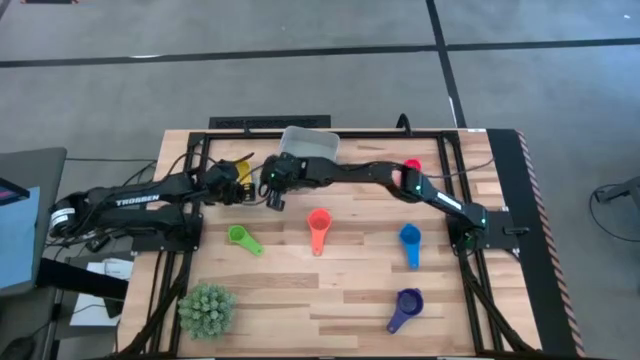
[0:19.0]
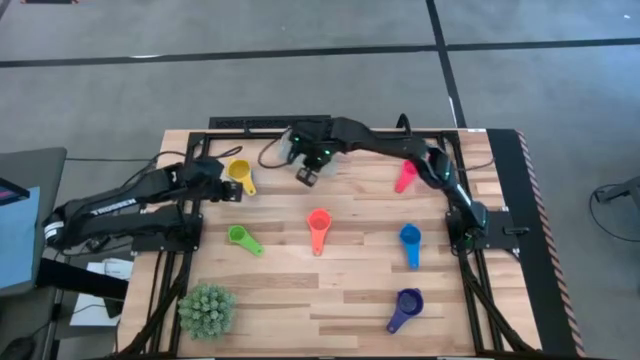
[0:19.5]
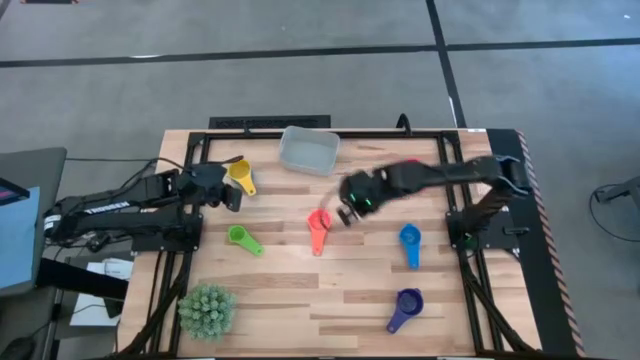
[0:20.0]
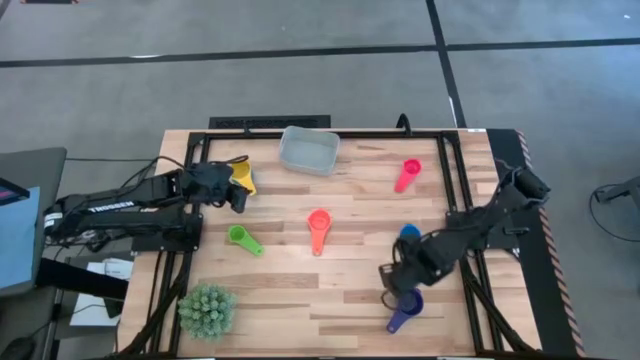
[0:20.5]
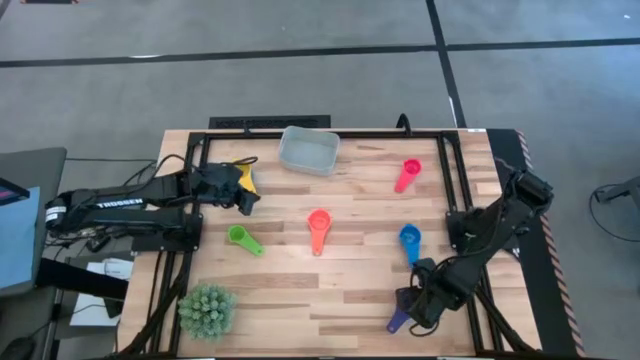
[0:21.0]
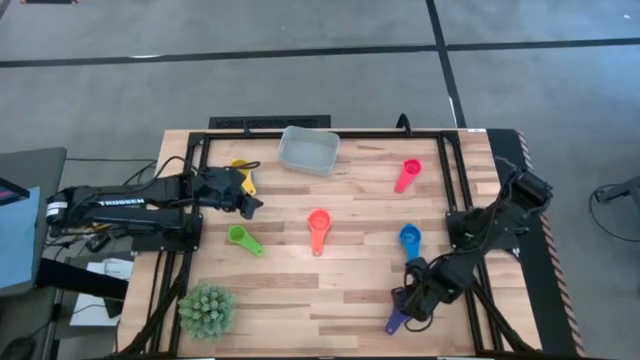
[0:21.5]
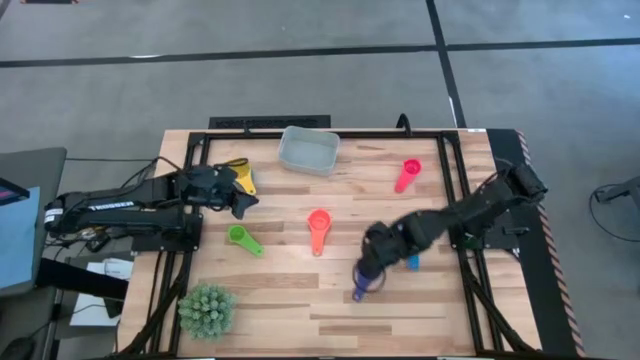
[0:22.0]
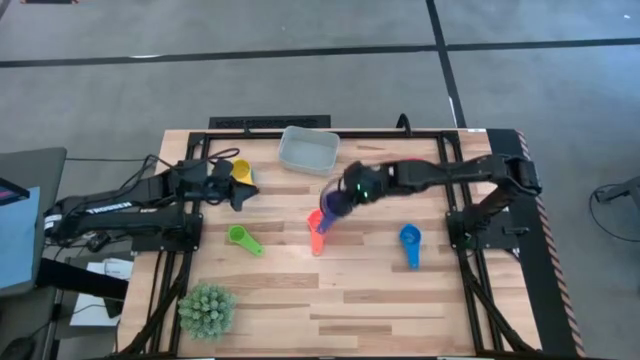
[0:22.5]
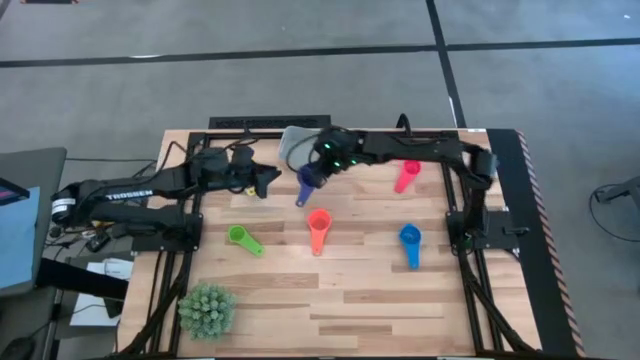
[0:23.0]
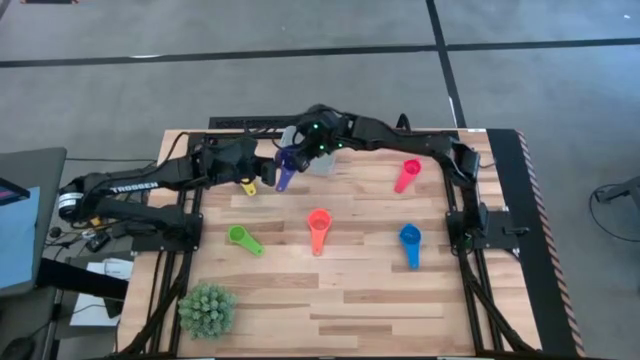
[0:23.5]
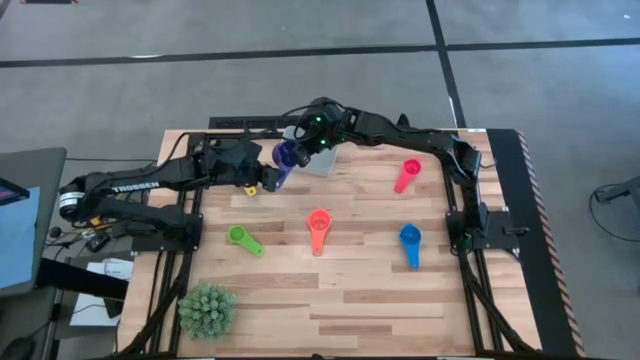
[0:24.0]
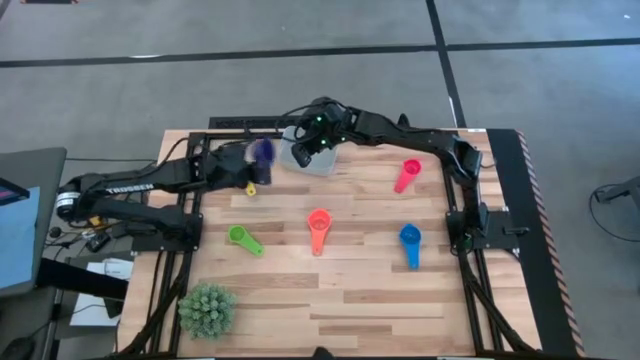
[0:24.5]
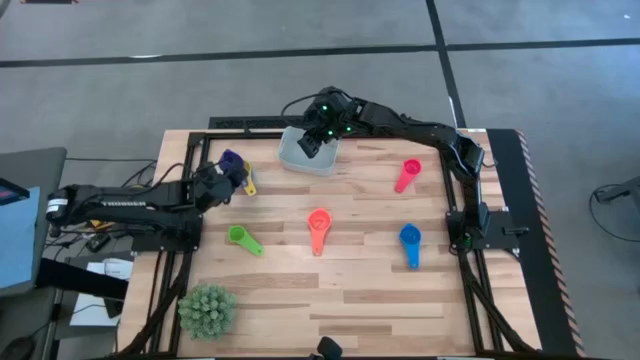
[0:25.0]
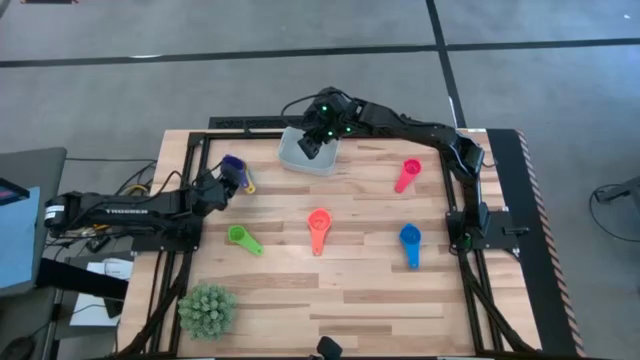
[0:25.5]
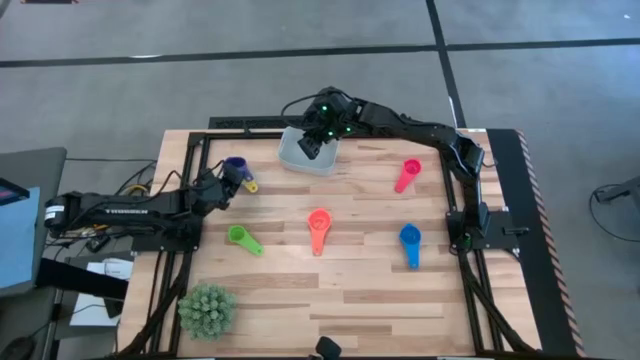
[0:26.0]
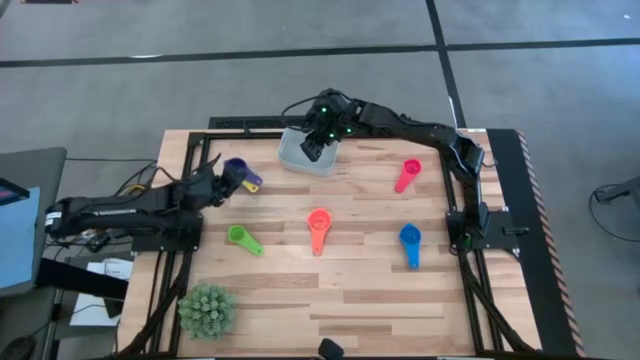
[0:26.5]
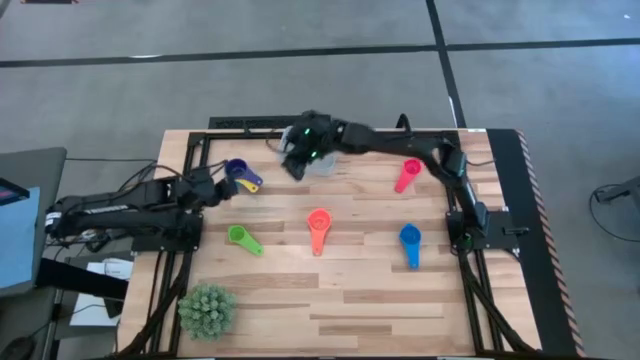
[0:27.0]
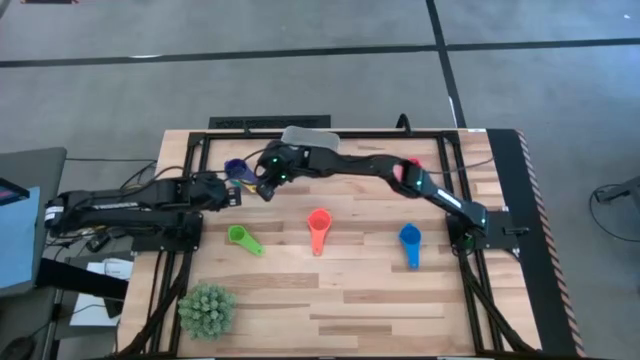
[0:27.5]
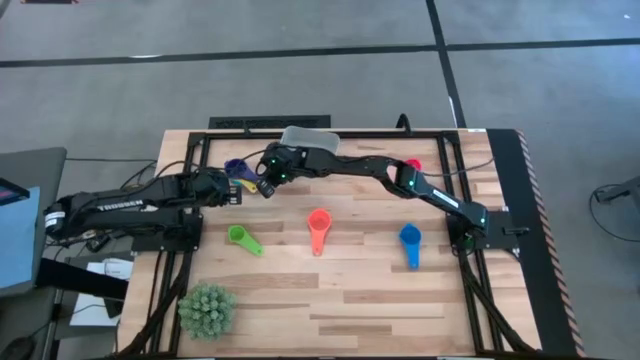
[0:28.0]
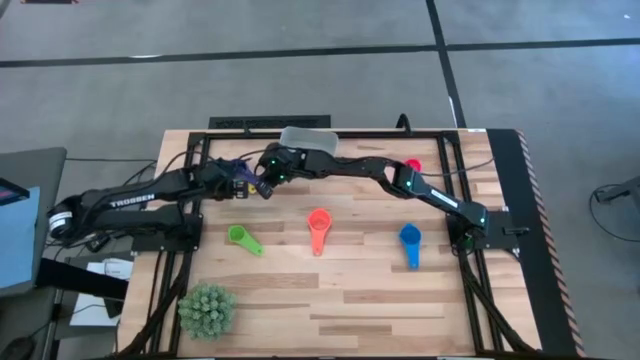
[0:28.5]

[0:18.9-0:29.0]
Task: Nest measuring cups in basket
Stack the navy blue measuring cup on the yellow measuring cup

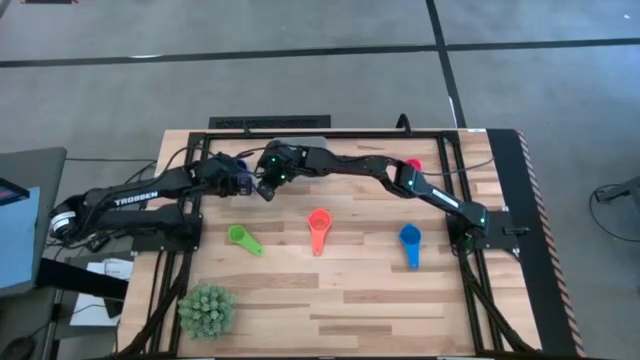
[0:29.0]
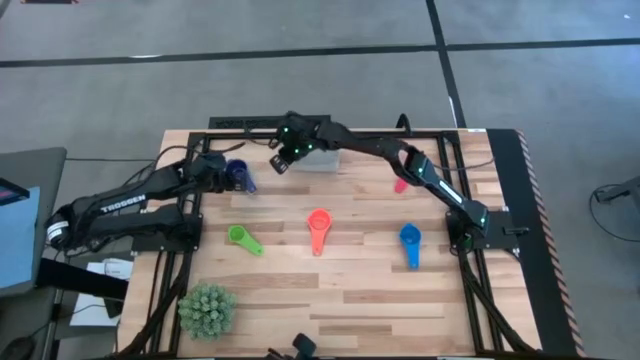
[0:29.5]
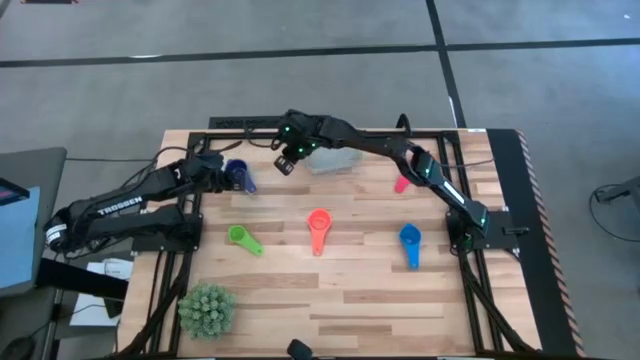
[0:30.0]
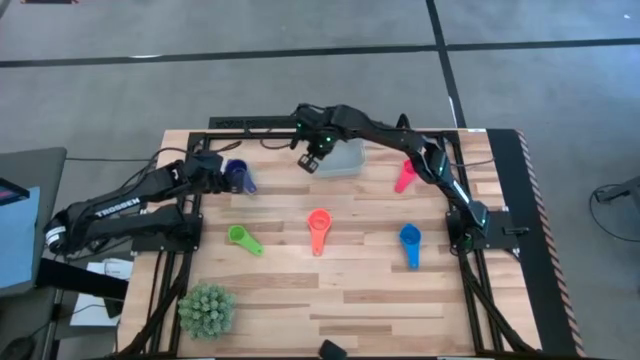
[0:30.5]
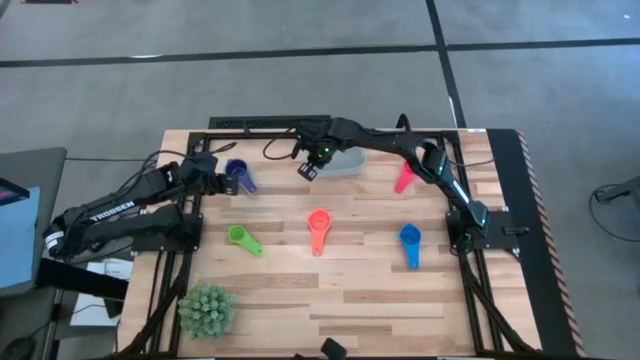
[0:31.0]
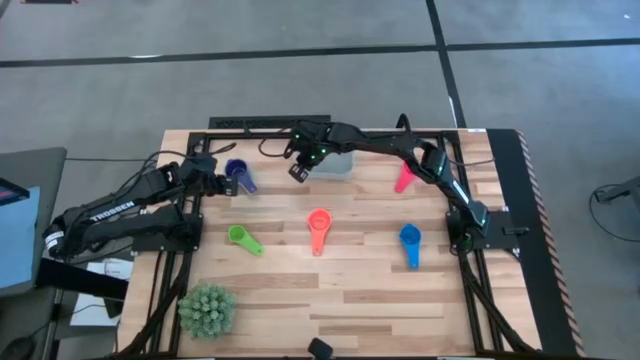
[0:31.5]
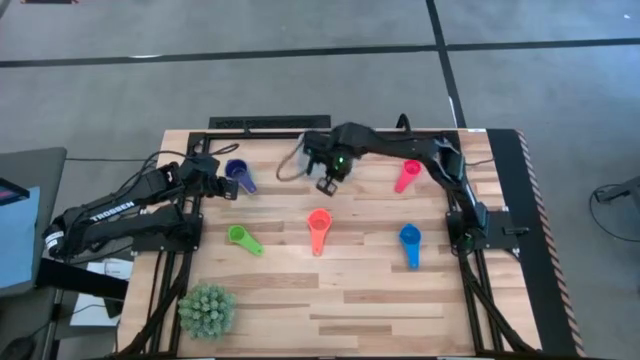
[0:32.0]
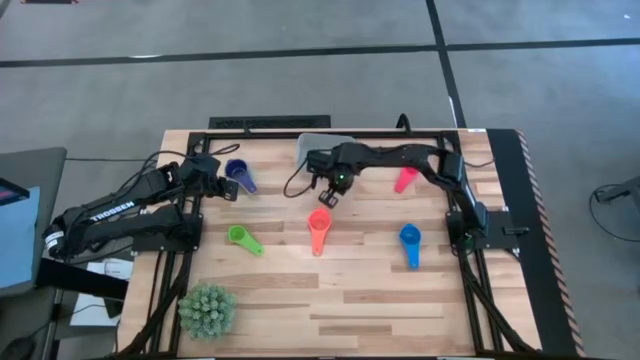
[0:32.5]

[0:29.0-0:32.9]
Adjust the white bin

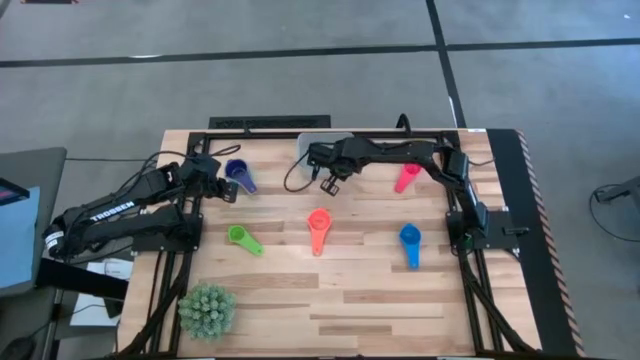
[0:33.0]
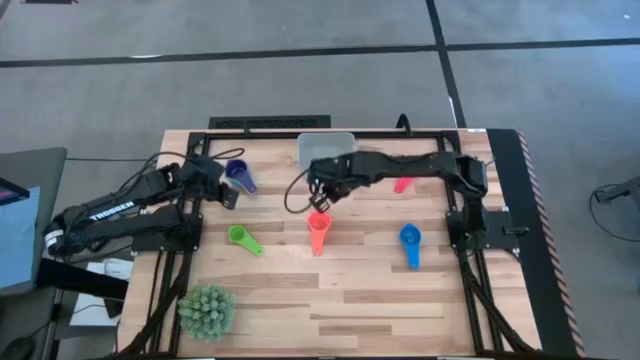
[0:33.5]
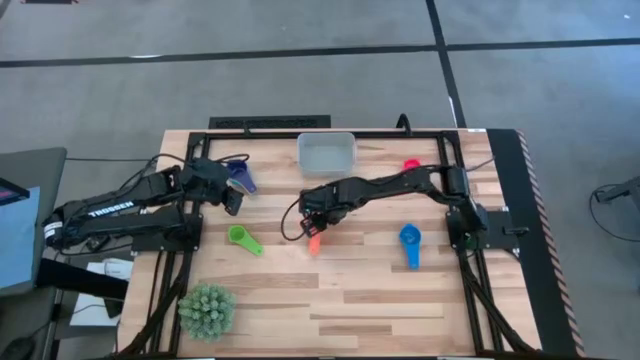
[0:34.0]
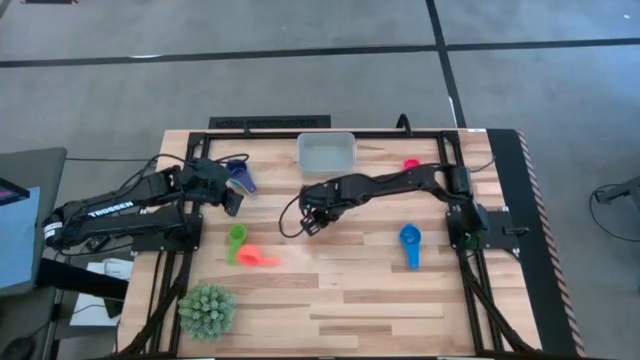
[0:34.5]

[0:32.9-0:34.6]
Stack the orange measuring cup on the navy blue measuring cup

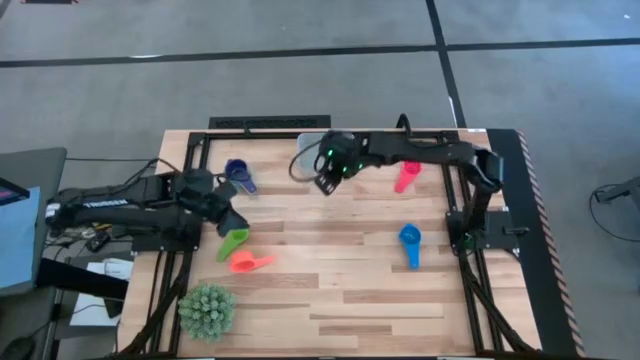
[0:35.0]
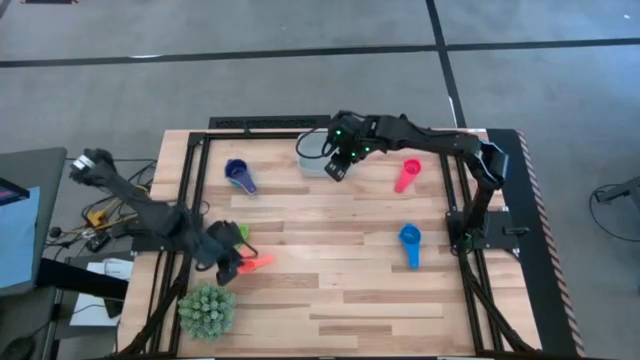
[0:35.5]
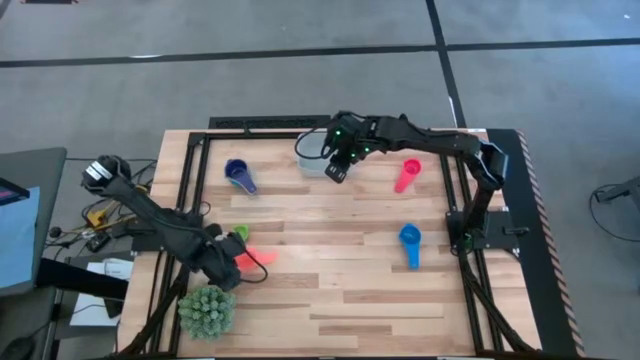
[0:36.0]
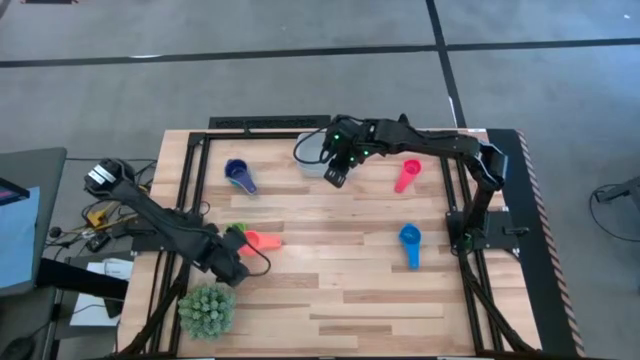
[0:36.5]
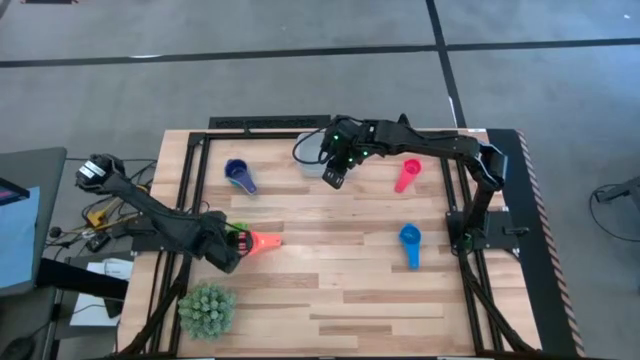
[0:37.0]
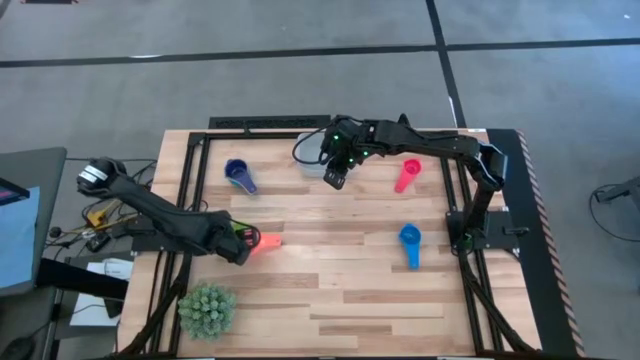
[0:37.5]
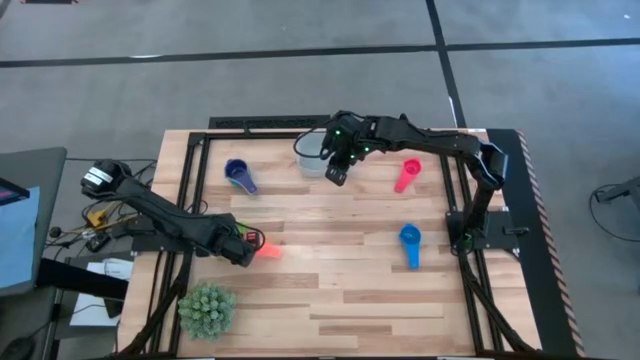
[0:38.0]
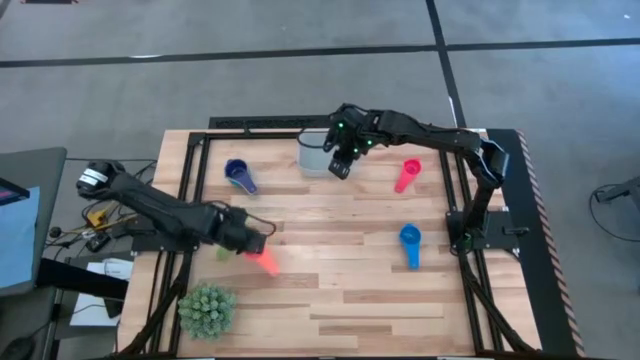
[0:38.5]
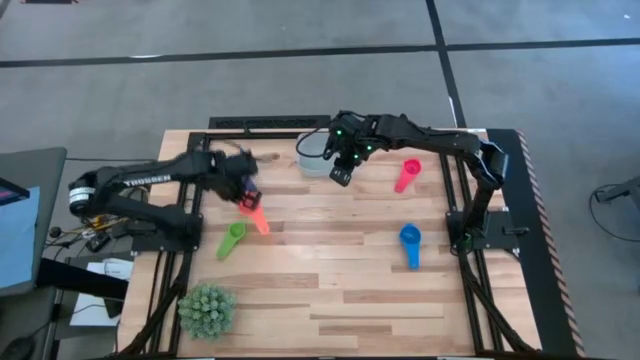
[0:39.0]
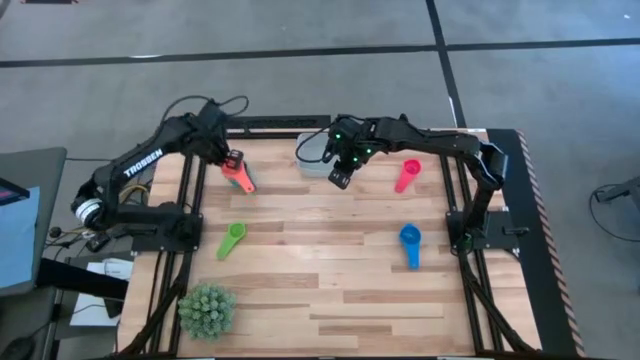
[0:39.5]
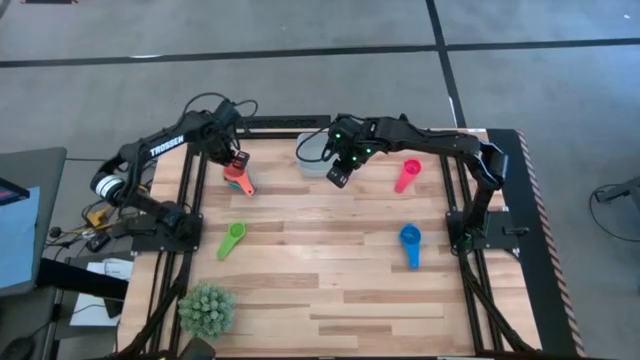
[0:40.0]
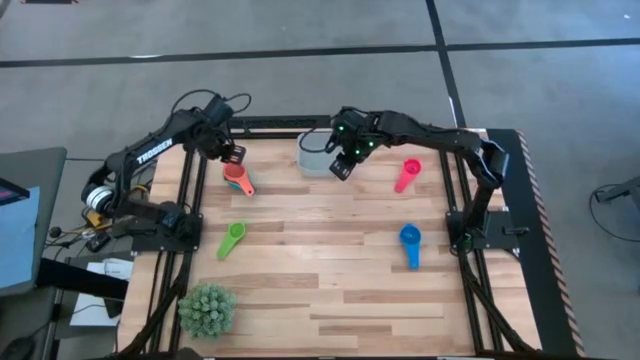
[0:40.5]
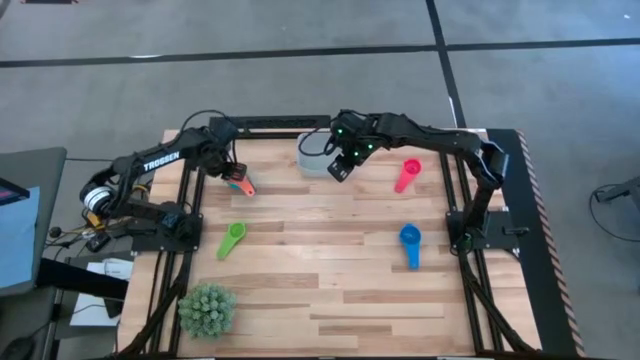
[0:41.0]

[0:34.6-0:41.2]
Stack the orange measuring cup on the navy blue measuring cup
